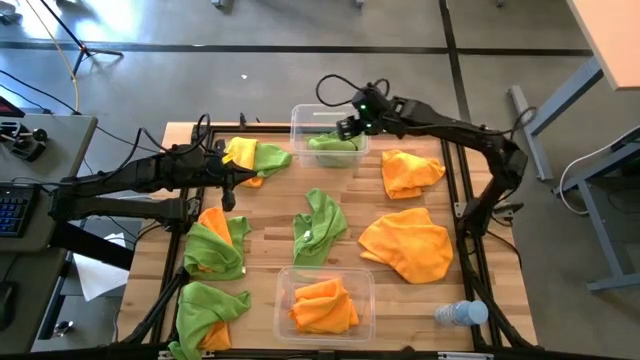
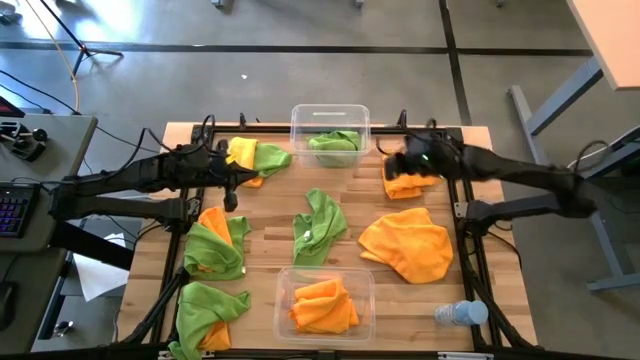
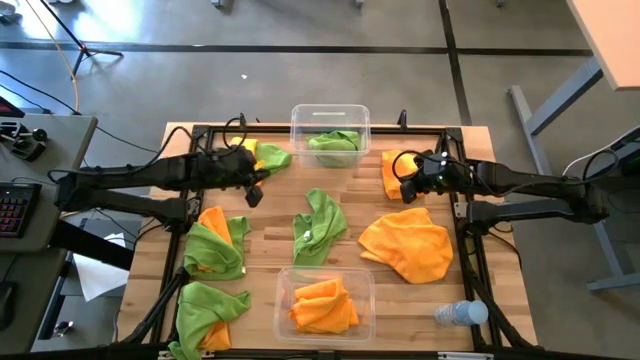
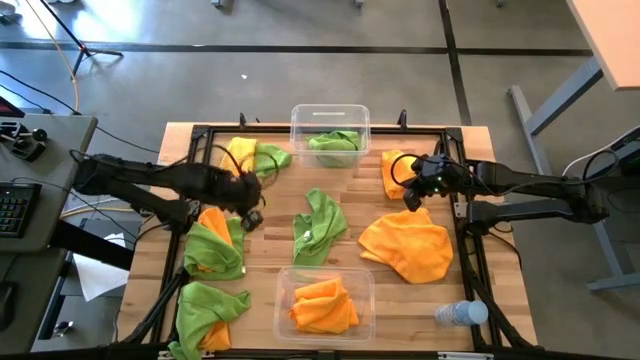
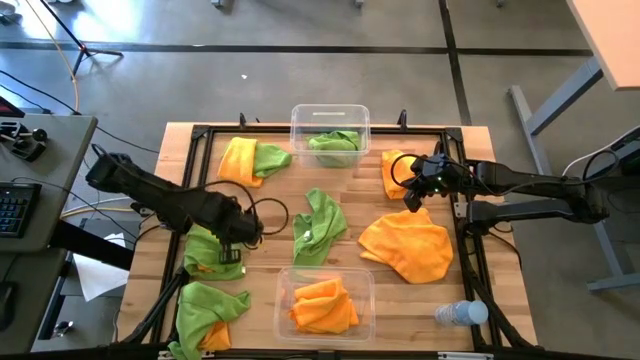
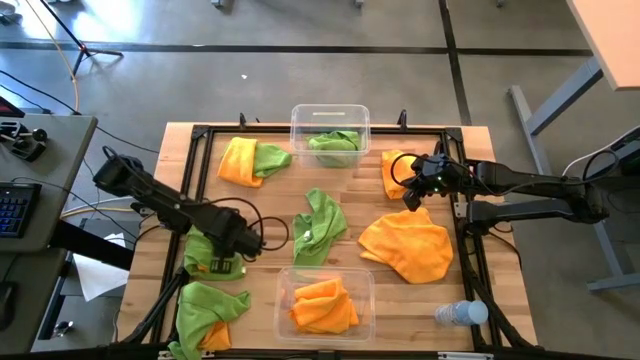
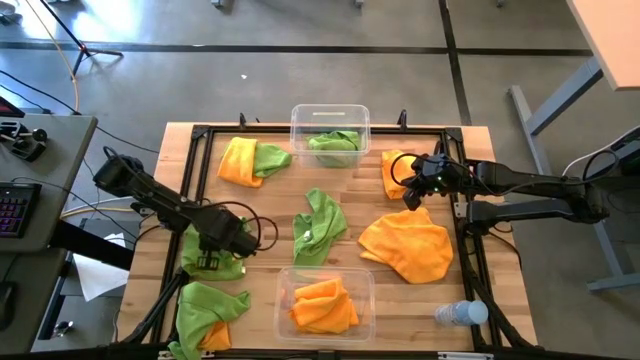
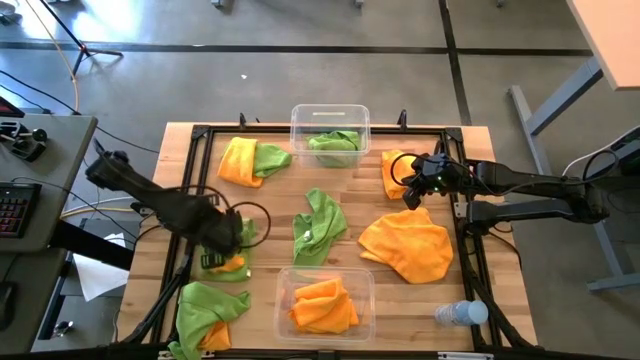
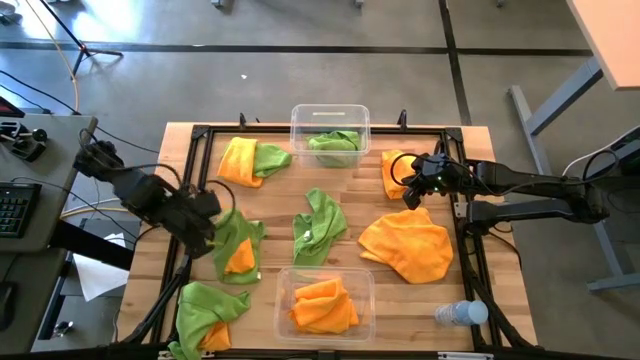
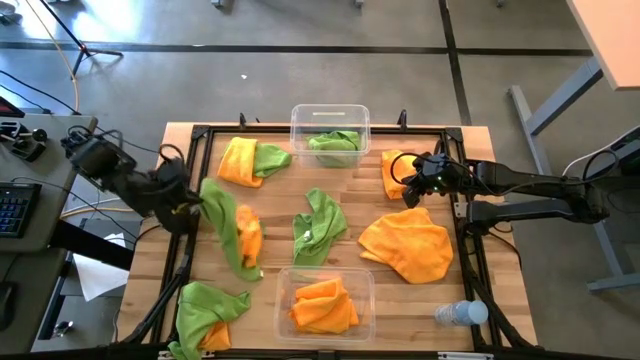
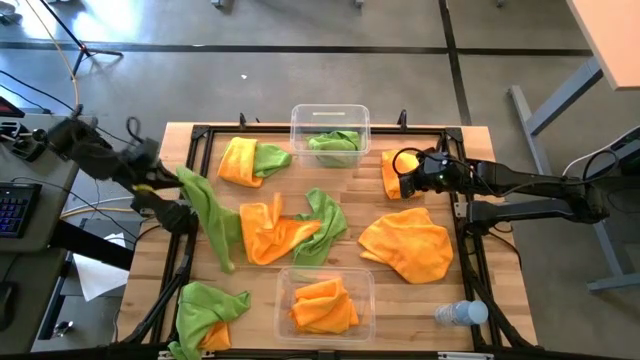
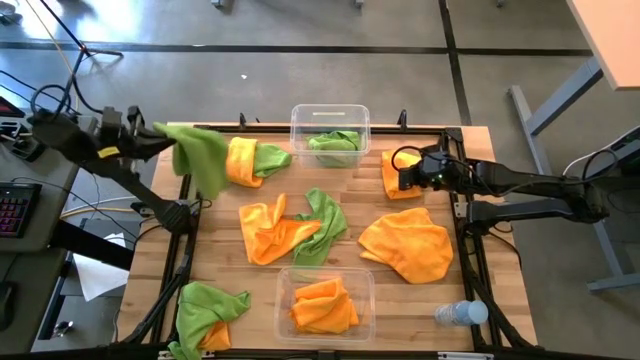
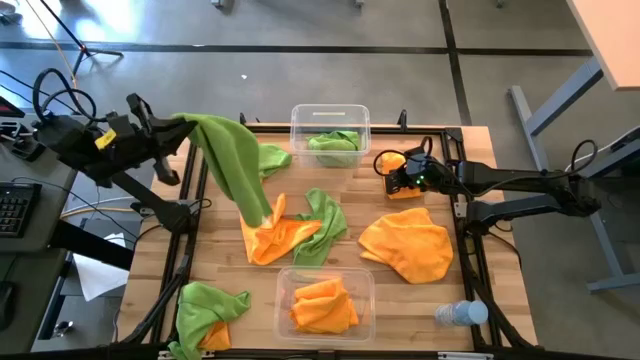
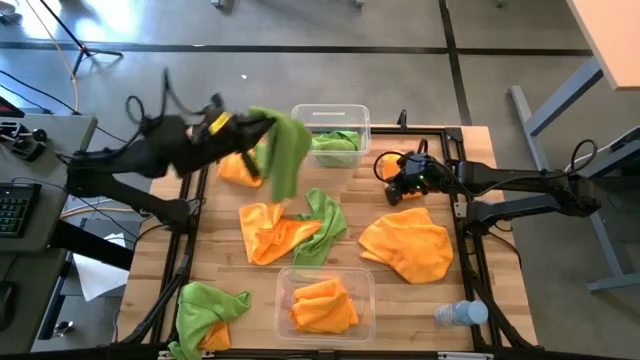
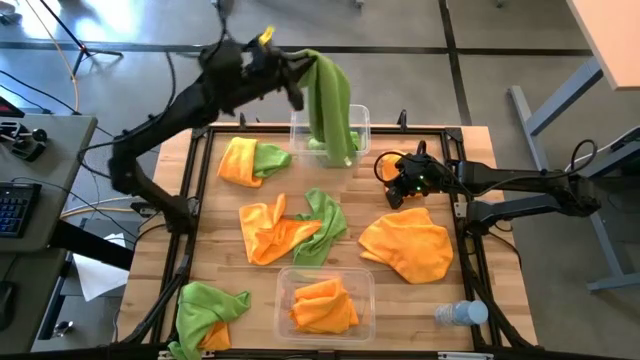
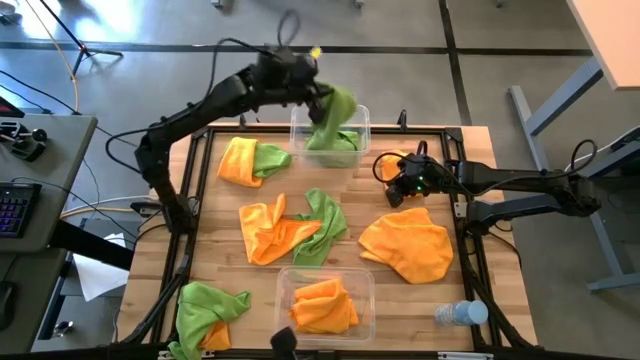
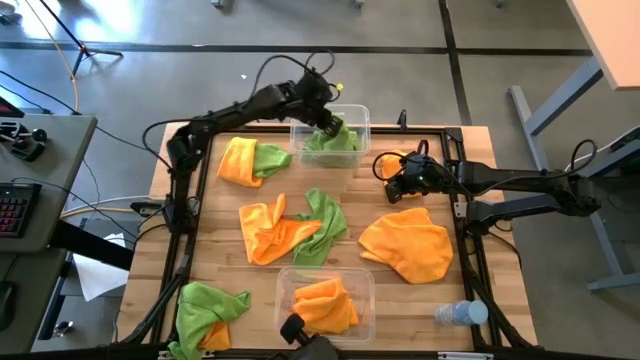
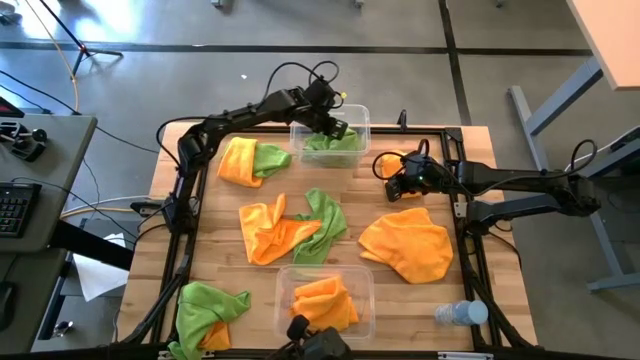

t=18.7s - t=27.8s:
Task: Sort microfiber towel by color & place in baskets
Put the green towel into the top transparent bin

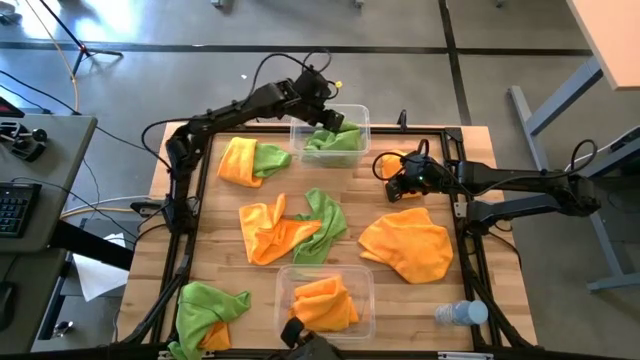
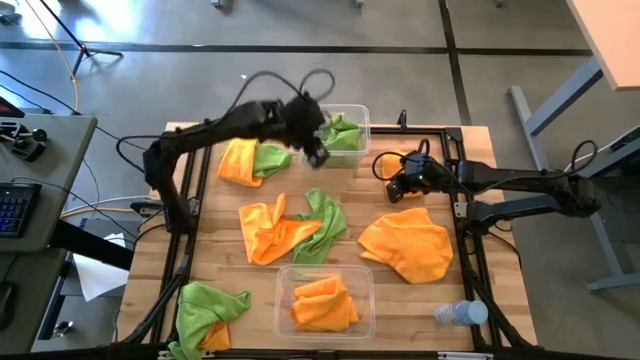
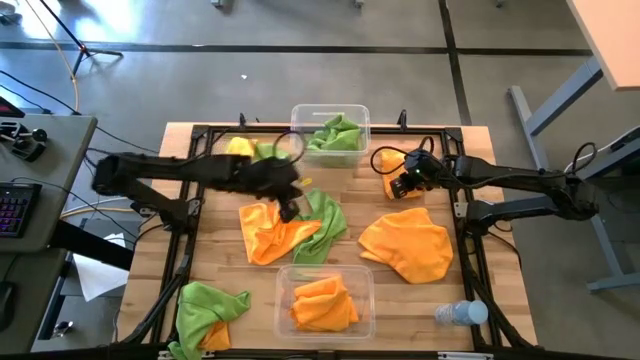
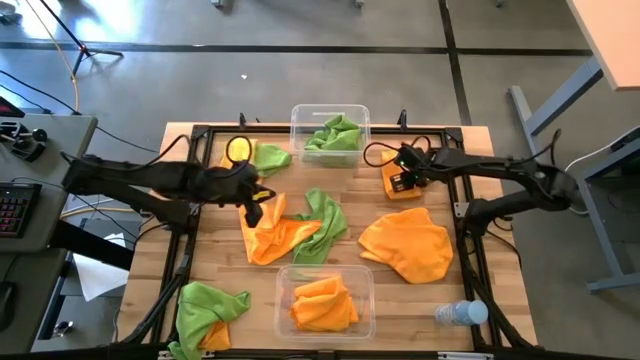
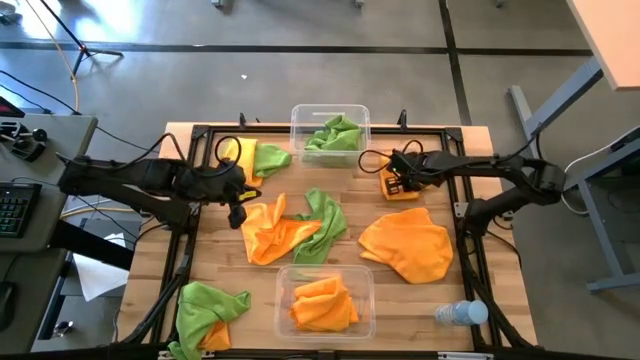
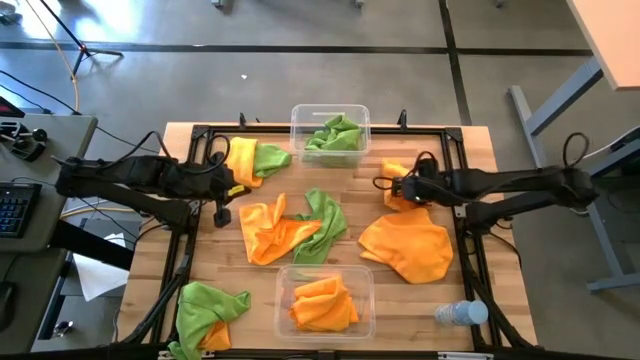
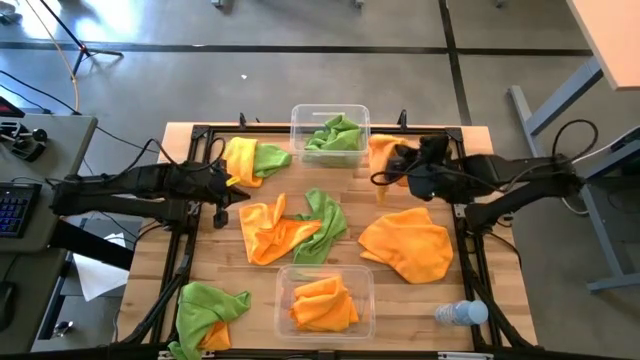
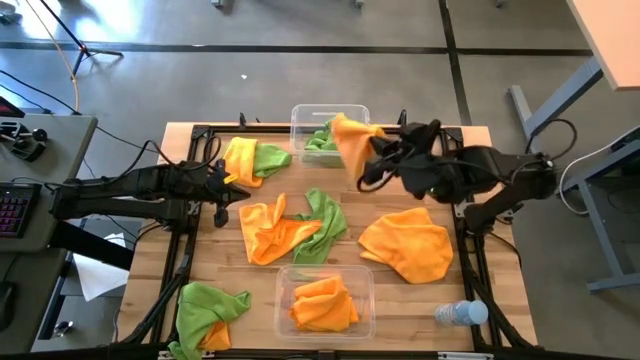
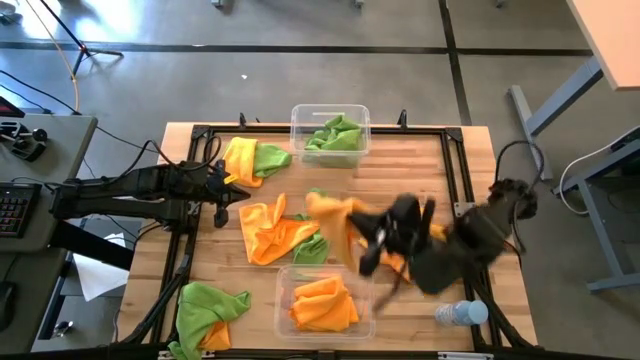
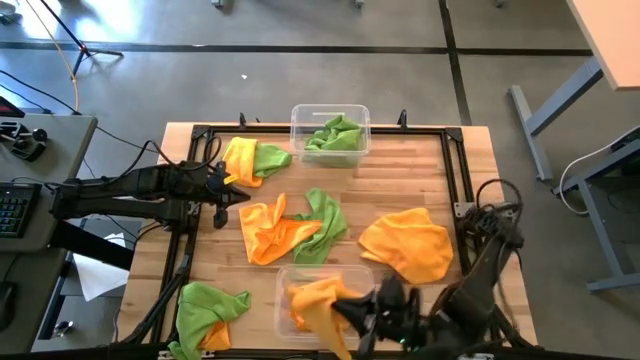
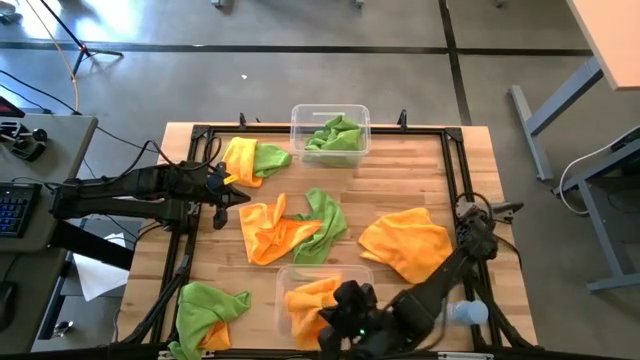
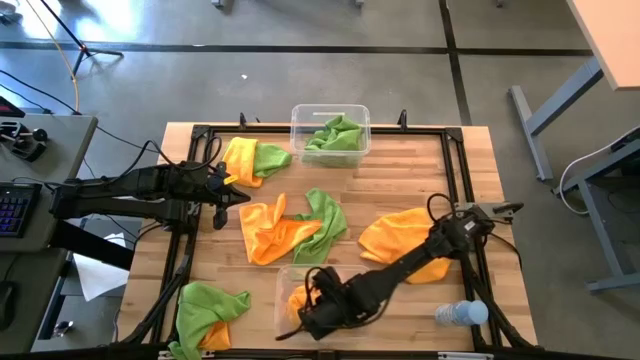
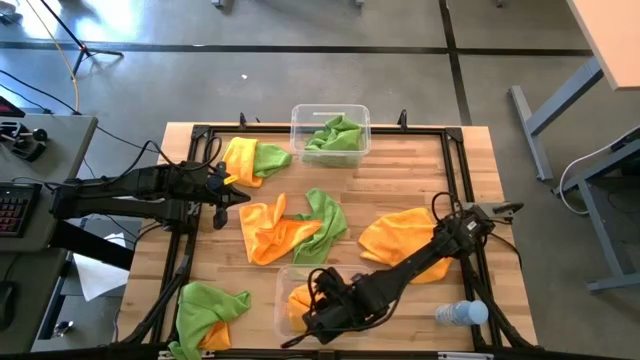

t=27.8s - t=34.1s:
Put the yellow towel into the bottom transparent bin

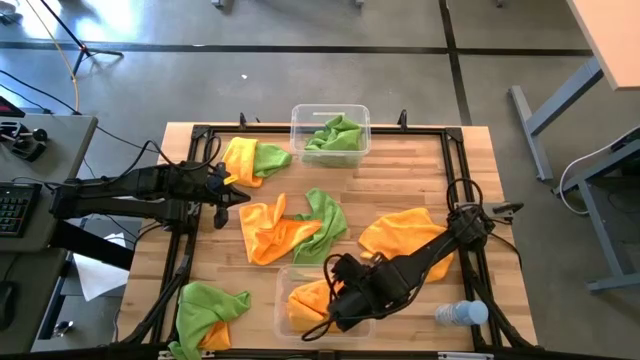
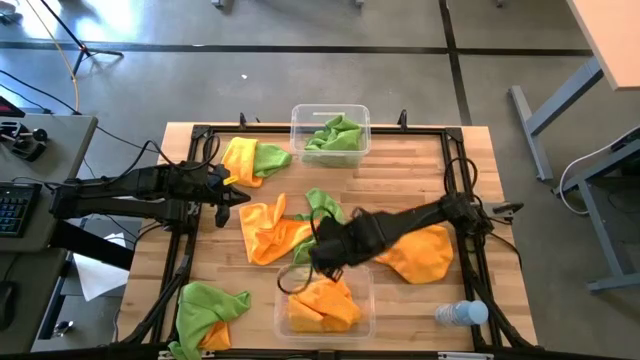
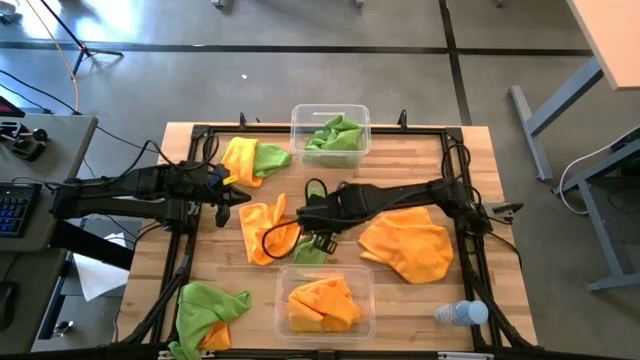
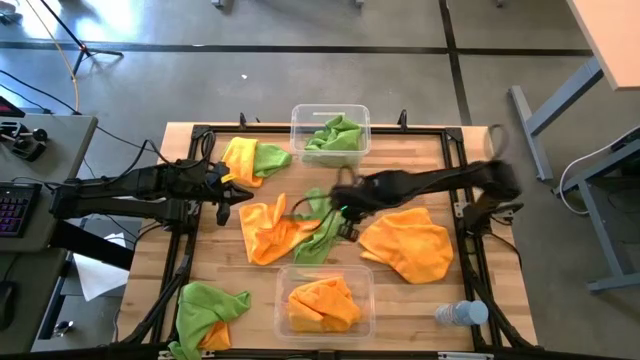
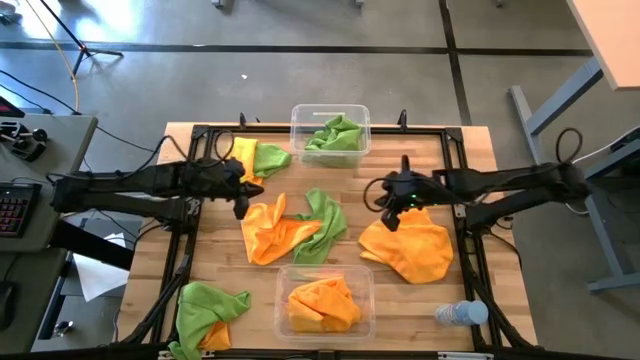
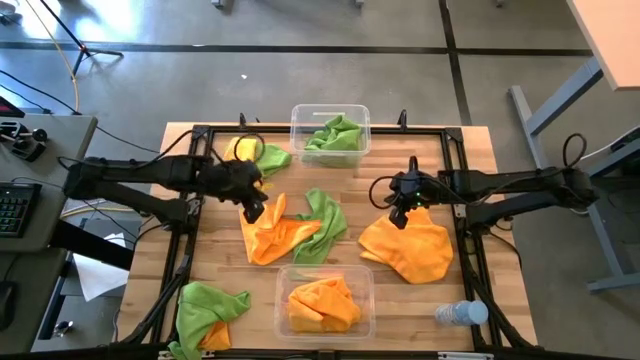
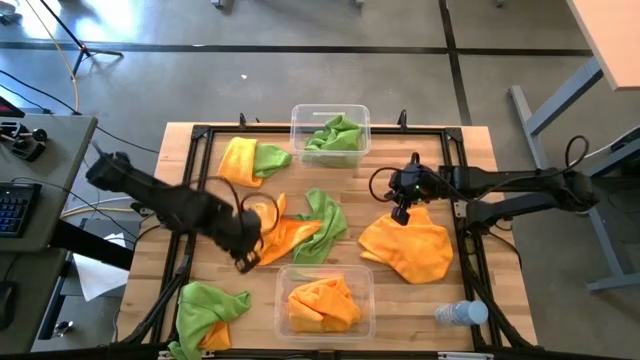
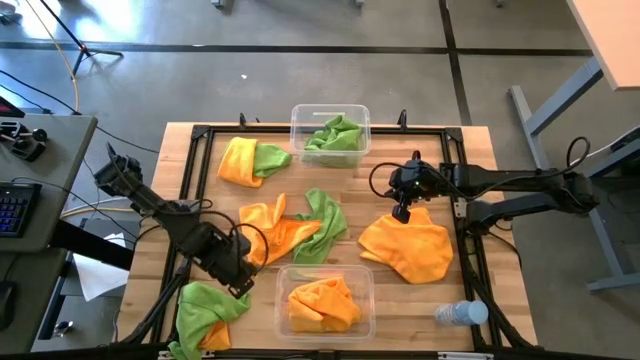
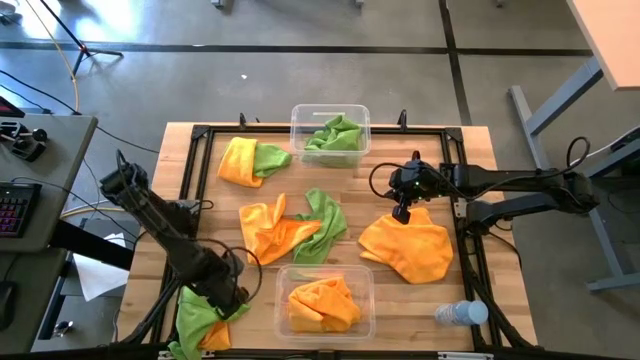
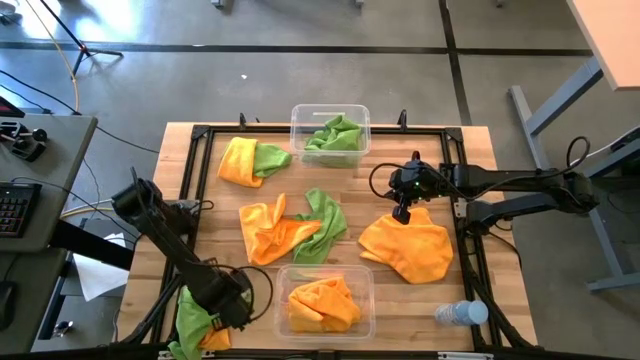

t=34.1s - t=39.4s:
Put the green towel into the top transparent bin
